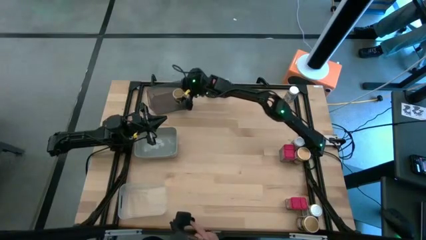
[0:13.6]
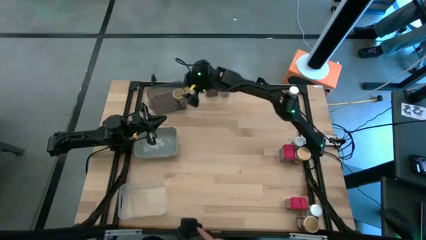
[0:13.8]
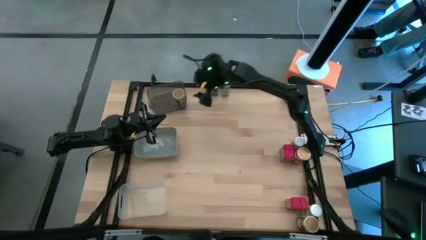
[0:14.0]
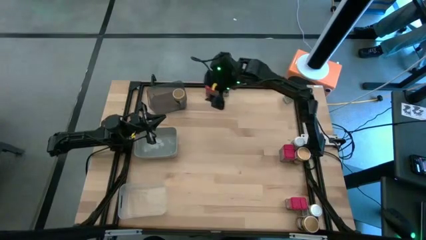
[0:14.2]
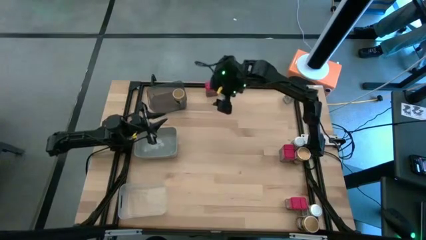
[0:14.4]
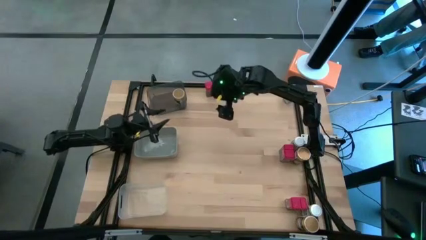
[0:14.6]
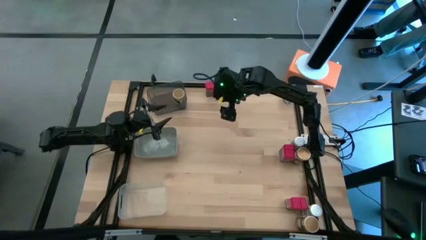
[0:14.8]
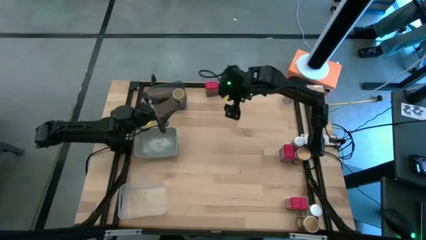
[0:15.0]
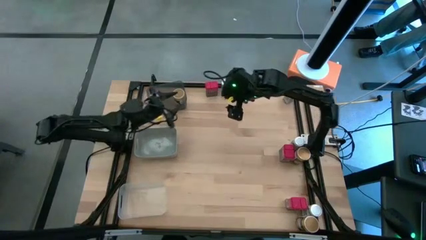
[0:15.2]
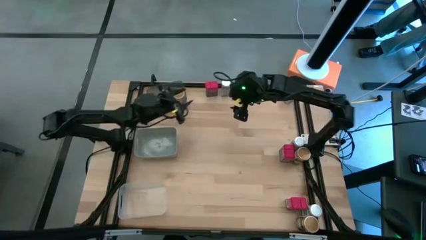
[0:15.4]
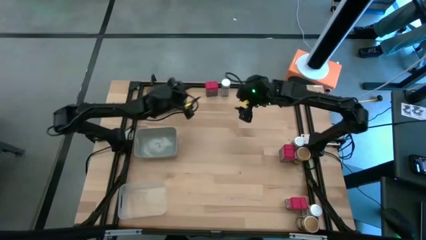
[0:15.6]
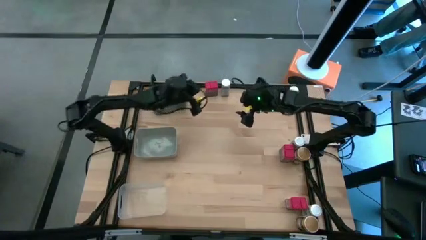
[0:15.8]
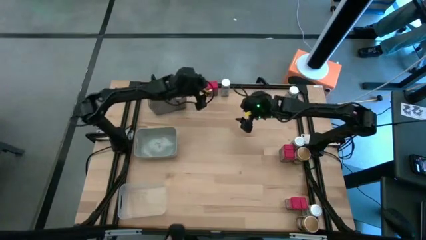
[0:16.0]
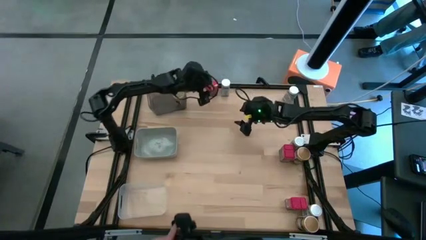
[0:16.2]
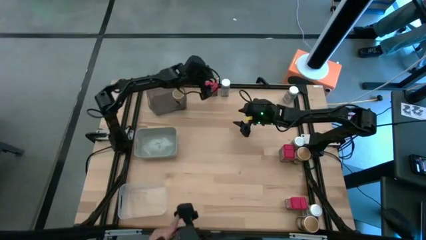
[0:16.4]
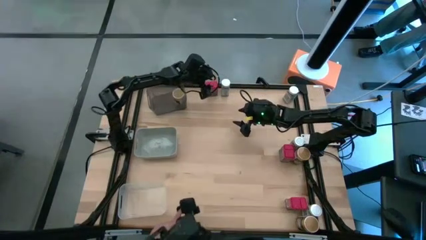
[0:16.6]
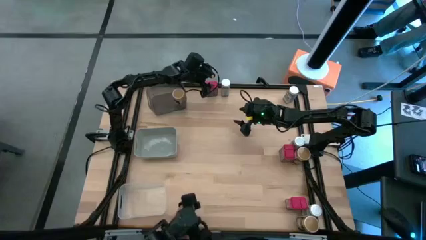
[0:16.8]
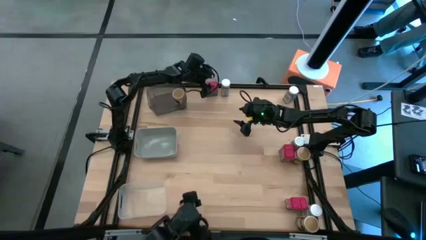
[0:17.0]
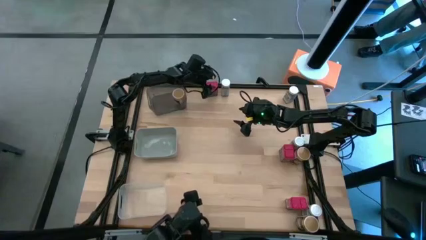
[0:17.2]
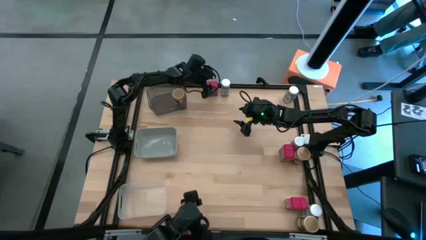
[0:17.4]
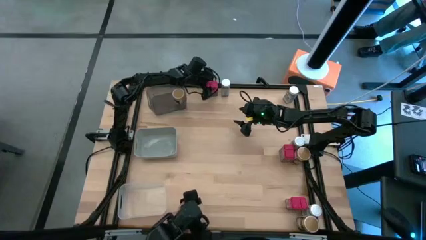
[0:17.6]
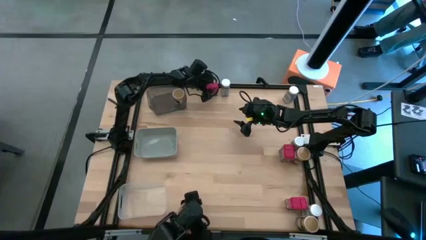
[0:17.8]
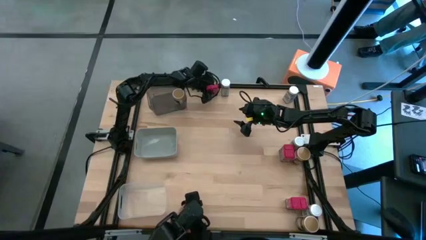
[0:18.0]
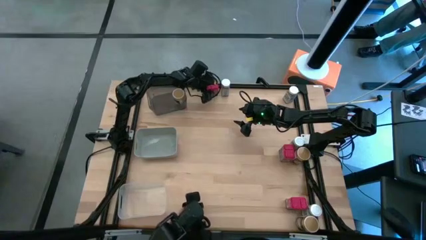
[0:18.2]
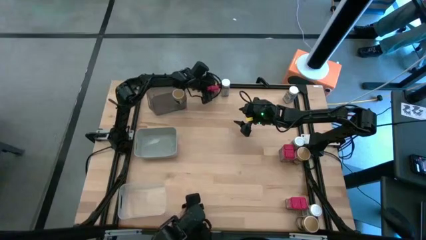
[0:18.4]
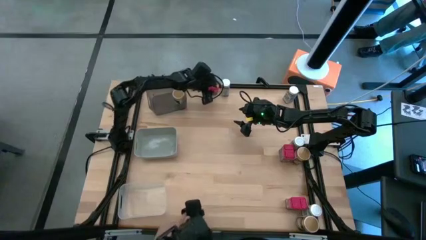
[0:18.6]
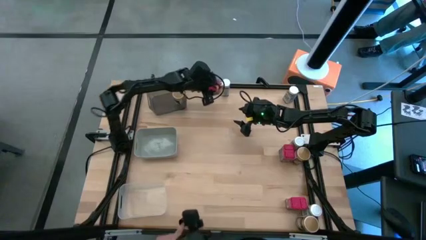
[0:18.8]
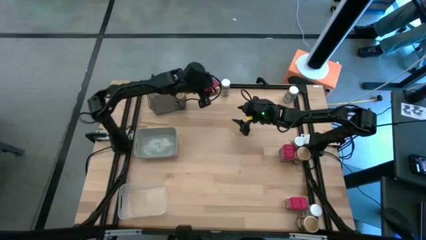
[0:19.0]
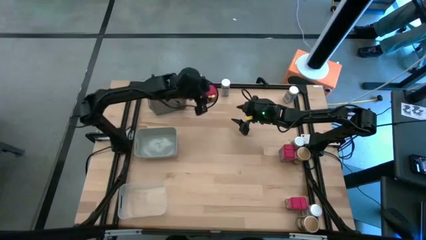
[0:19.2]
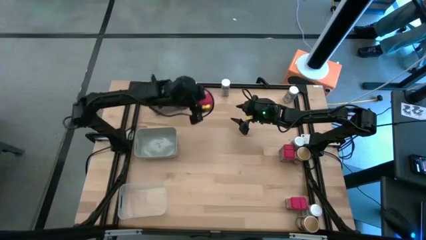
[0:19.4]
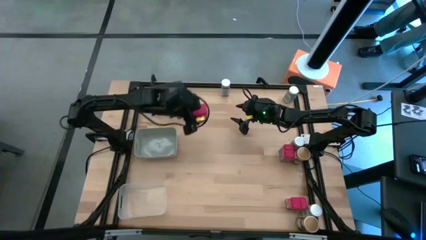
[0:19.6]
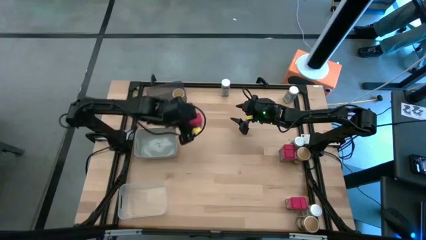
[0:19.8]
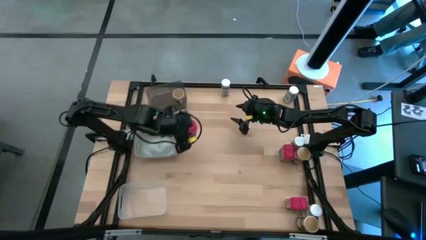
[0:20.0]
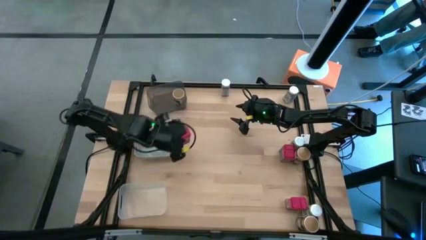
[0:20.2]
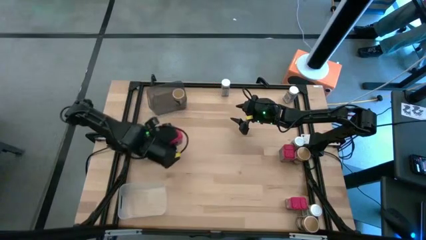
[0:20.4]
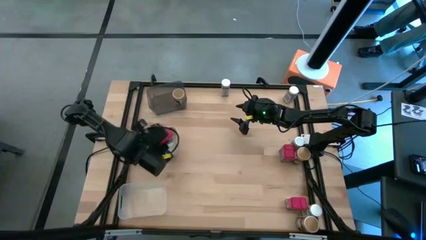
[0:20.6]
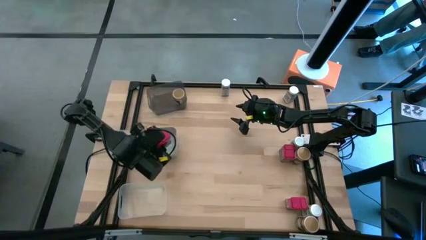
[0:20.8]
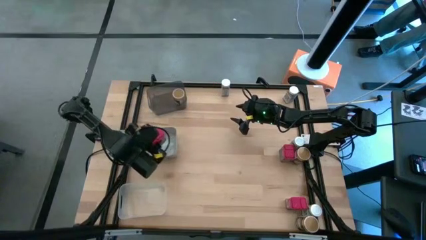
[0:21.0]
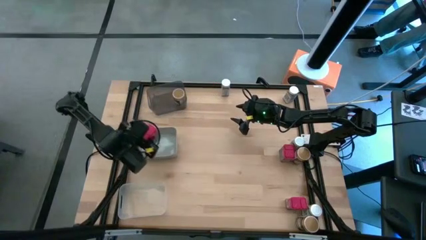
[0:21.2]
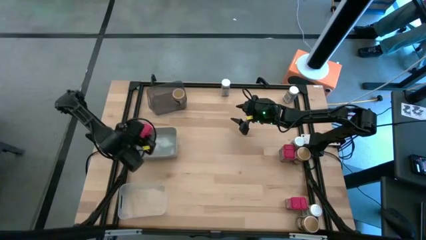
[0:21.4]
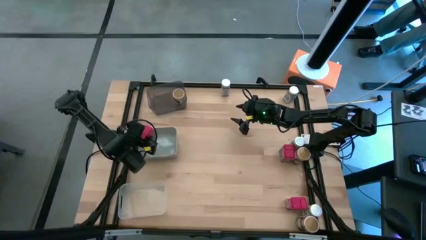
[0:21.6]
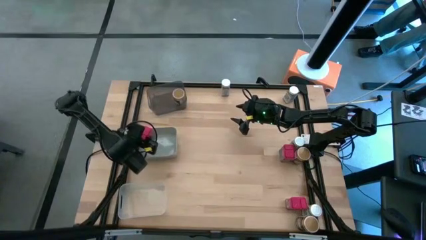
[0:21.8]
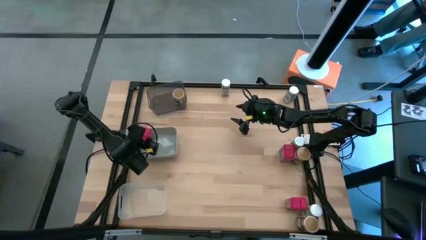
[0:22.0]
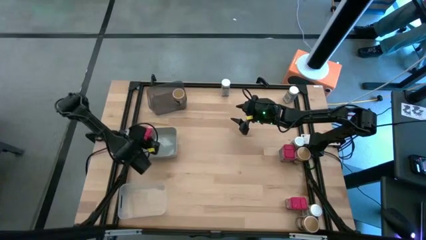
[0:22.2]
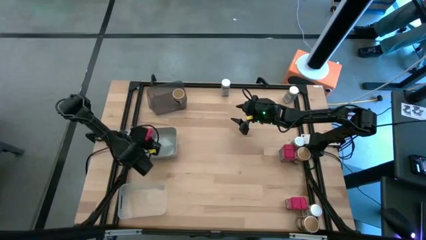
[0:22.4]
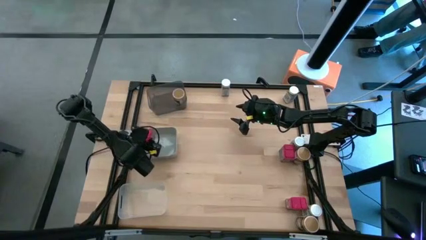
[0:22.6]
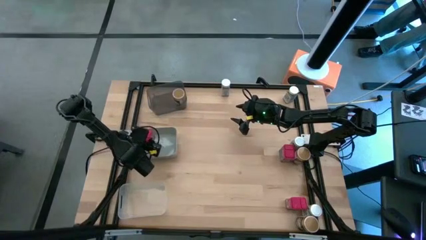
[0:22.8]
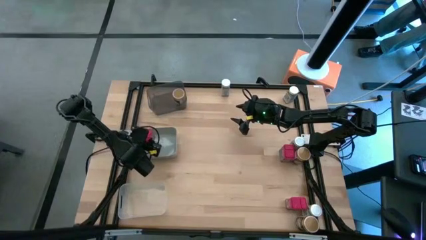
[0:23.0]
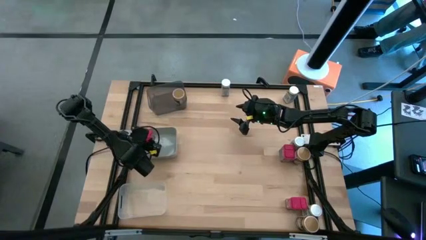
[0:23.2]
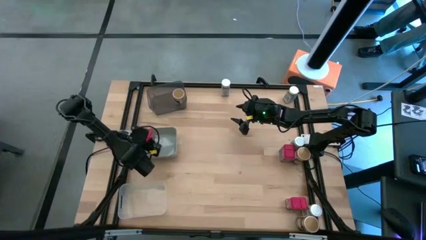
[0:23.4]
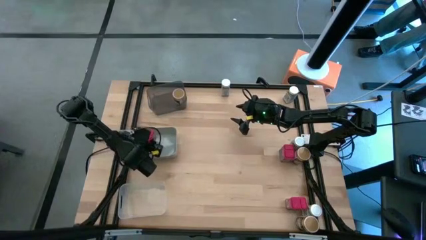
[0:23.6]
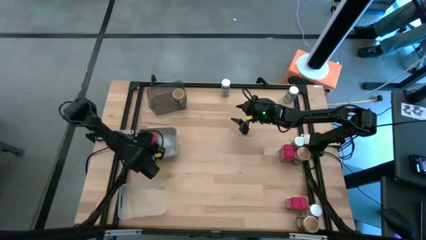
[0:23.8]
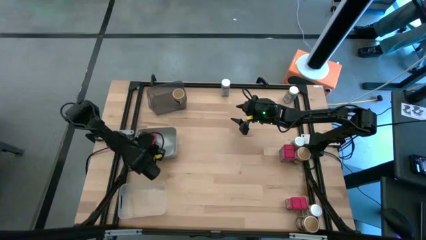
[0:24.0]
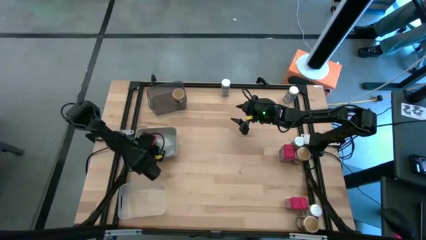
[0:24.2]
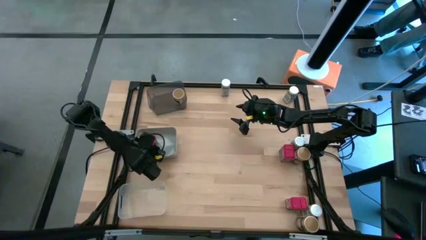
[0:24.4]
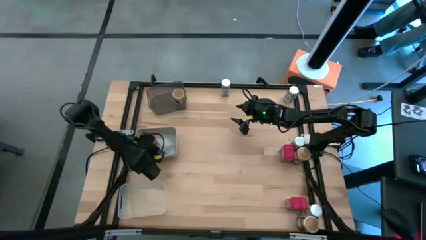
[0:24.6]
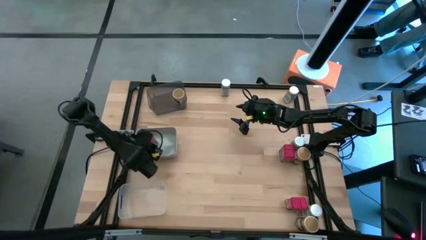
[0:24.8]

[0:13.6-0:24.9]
Task: Sort spices by type
Put the top left red seasoning can into the gray bin
